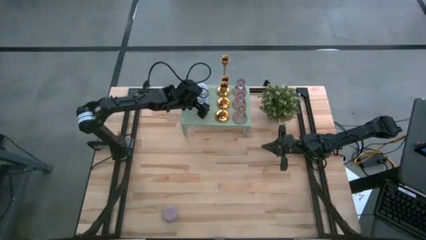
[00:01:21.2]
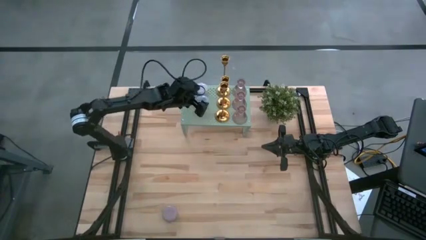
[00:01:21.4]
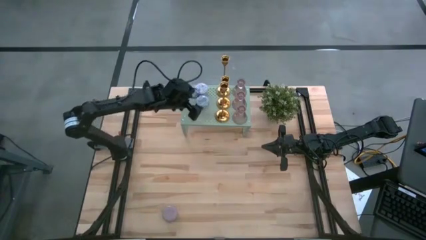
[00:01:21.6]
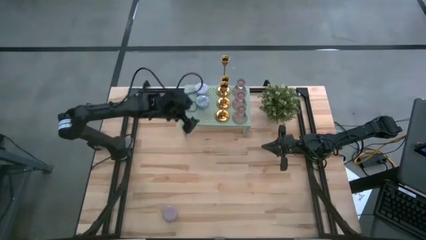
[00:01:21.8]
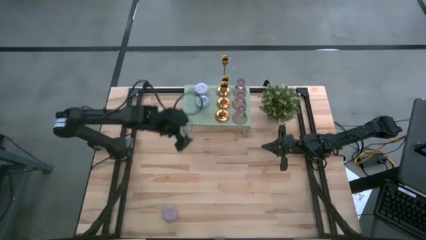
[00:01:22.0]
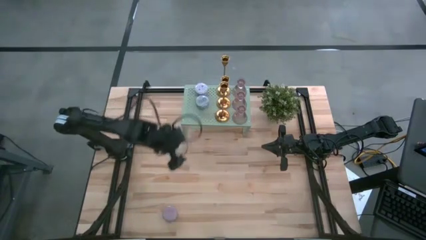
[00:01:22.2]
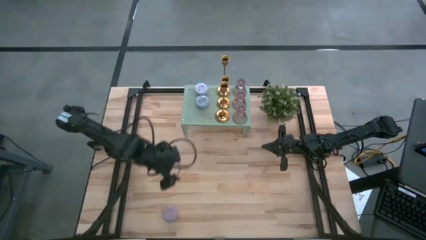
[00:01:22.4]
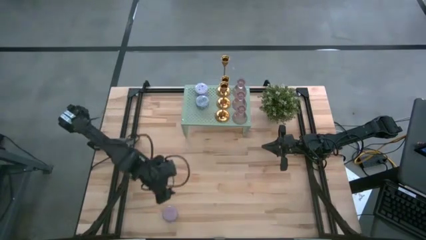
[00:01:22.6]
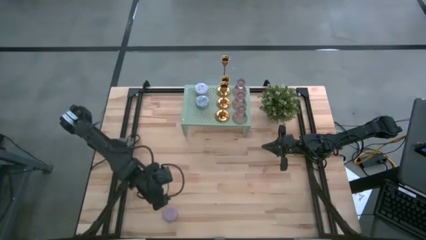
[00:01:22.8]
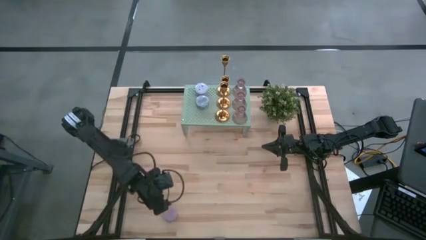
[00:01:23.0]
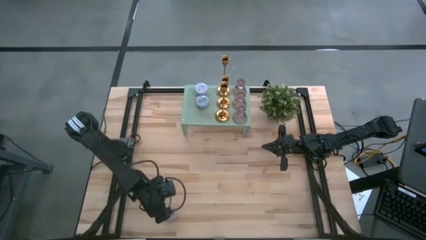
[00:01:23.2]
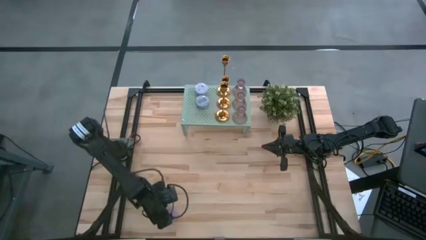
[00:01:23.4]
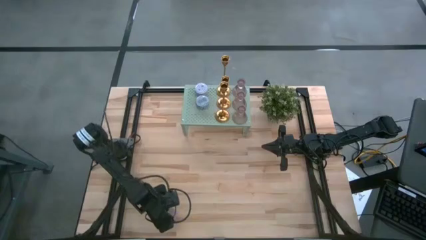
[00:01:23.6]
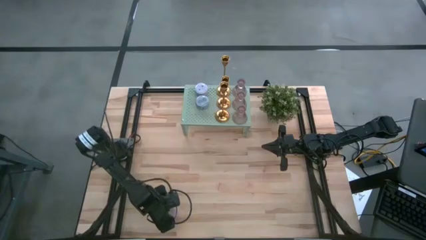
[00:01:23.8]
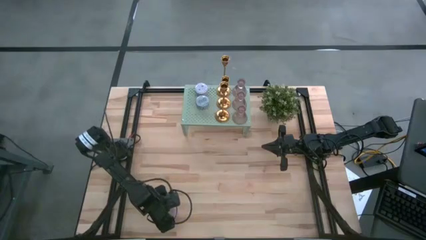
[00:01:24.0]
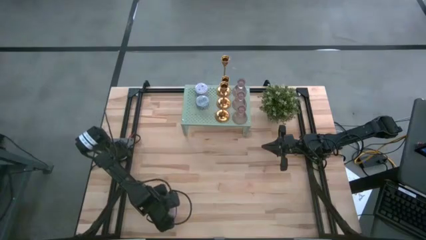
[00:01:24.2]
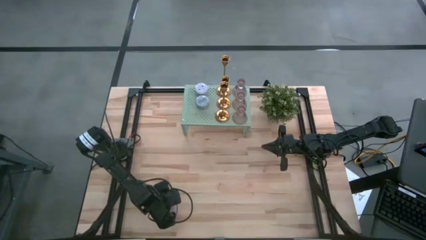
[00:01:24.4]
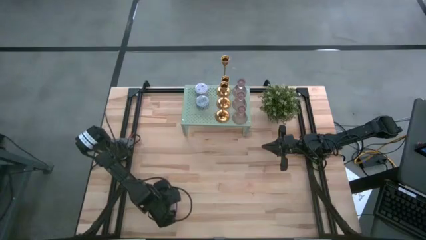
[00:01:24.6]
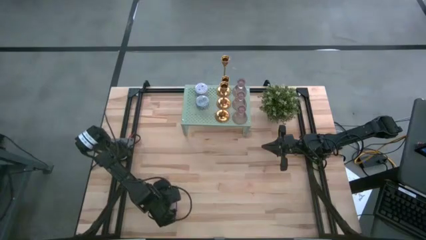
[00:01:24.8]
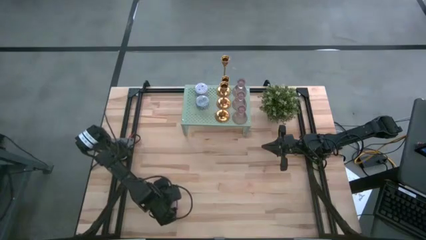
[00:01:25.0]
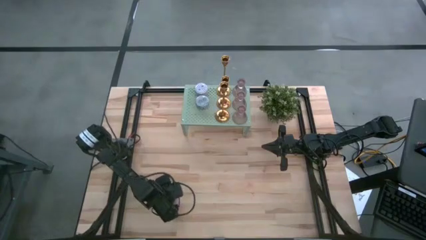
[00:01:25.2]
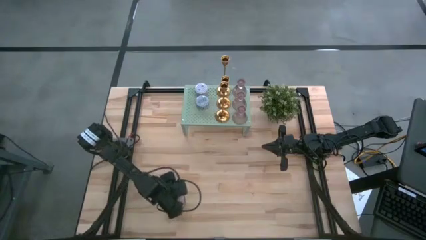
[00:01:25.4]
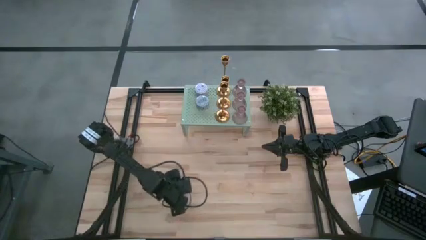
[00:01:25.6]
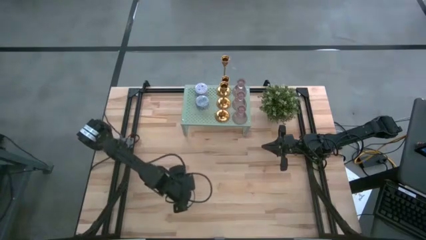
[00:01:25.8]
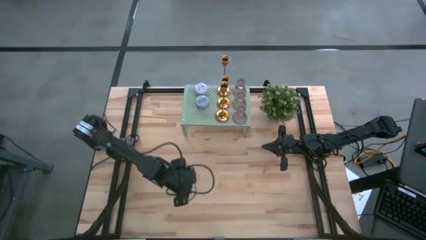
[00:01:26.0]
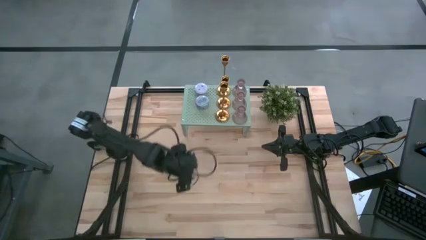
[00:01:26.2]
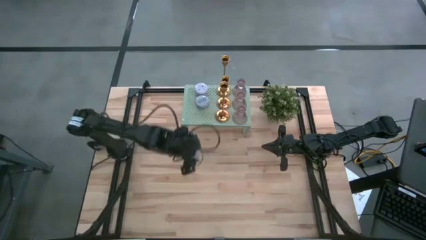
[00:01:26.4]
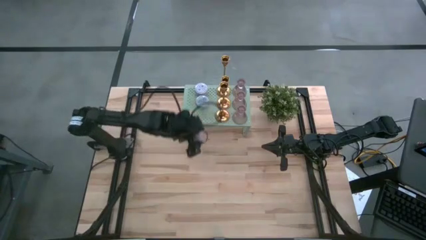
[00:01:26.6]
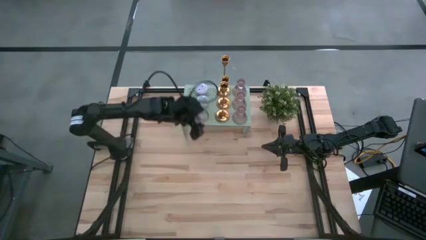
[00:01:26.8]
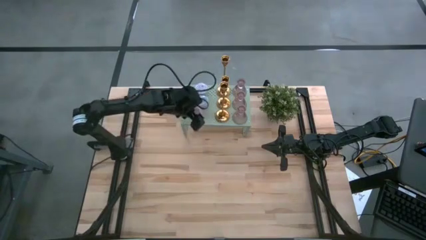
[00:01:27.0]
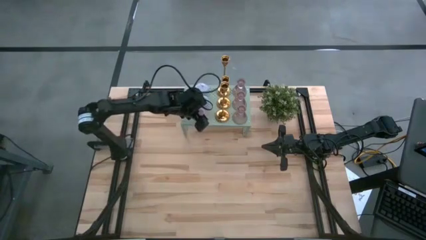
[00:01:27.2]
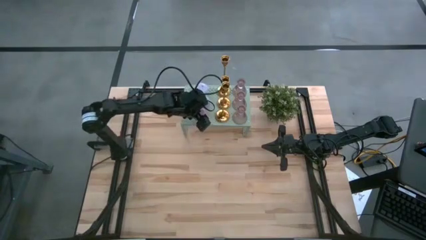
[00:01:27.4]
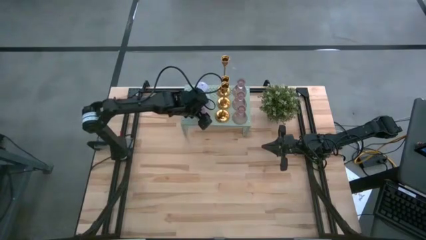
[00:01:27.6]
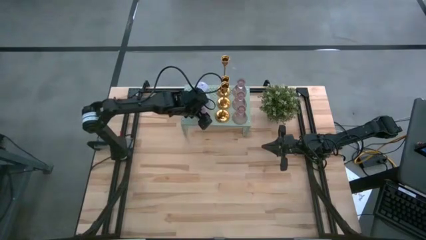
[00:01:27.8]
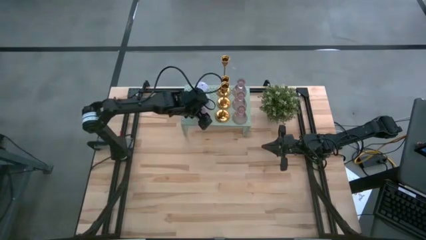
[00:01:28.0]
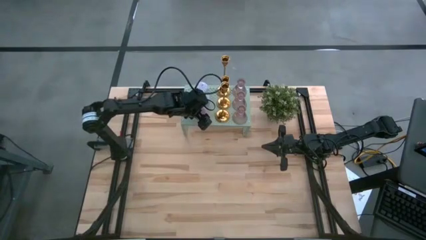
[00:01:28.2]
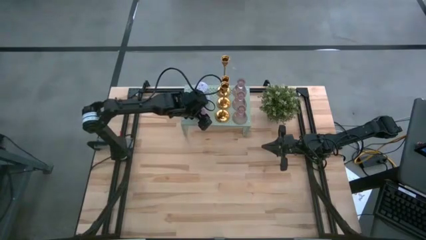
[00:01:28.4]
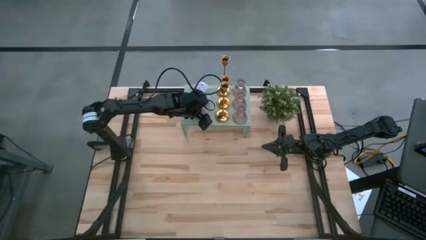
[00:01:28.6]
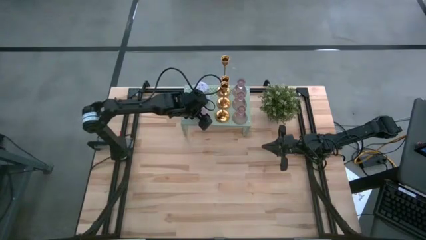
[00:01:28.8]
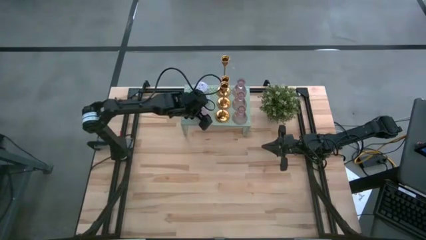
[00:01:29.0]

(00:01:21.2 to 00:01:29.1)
Task: Pick & Place candle stick holders
Put the pink scented candle on the shelf aligned with the other scented candle

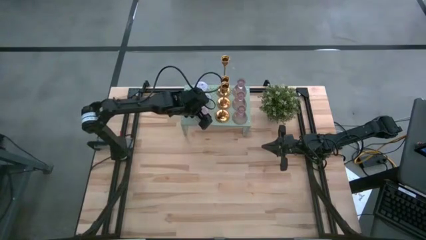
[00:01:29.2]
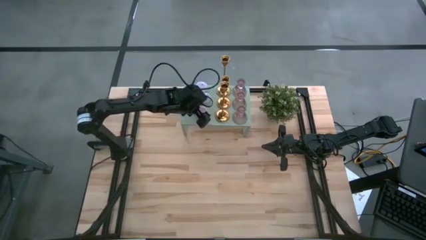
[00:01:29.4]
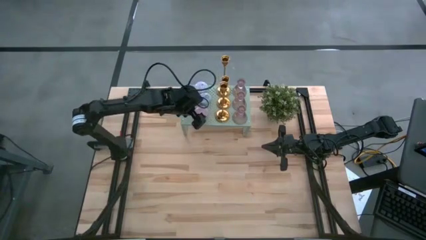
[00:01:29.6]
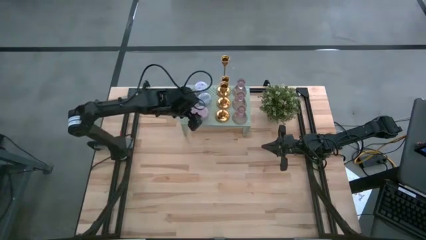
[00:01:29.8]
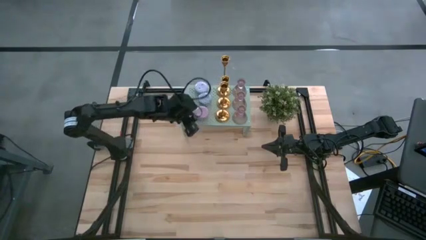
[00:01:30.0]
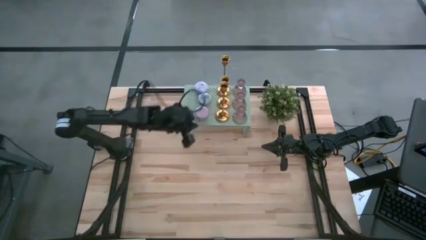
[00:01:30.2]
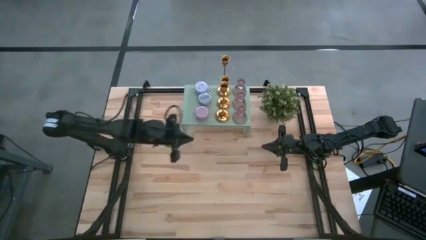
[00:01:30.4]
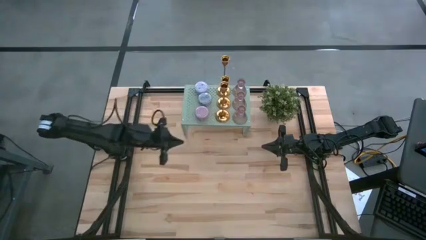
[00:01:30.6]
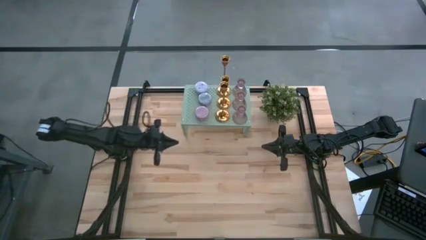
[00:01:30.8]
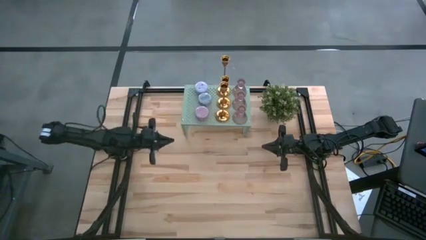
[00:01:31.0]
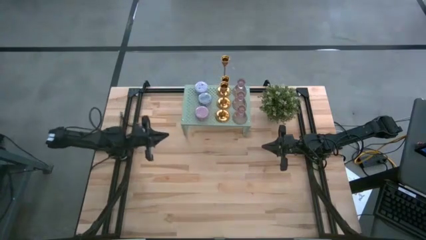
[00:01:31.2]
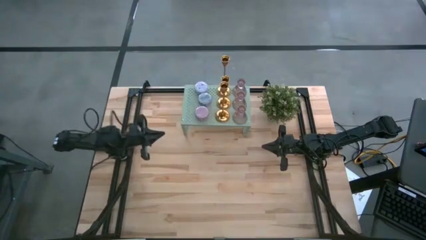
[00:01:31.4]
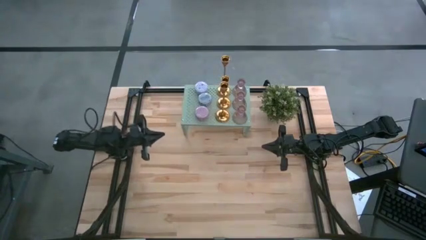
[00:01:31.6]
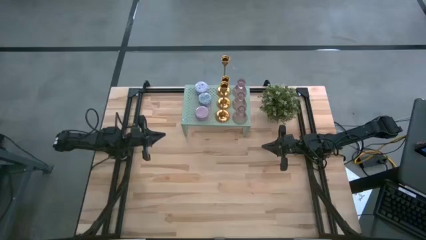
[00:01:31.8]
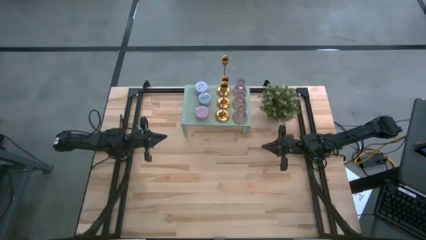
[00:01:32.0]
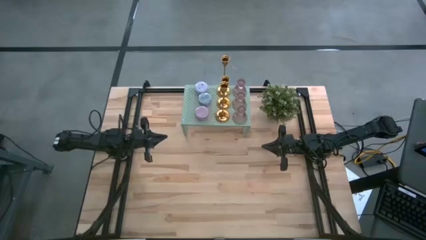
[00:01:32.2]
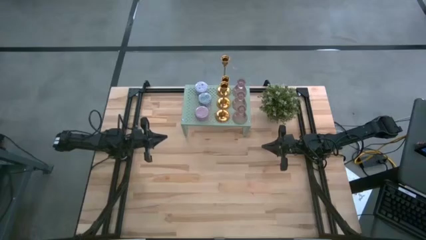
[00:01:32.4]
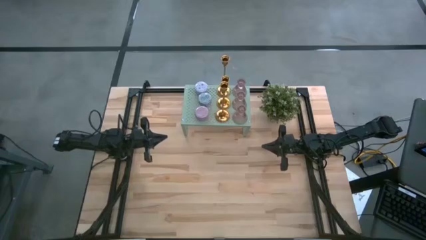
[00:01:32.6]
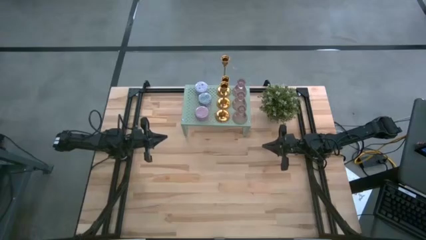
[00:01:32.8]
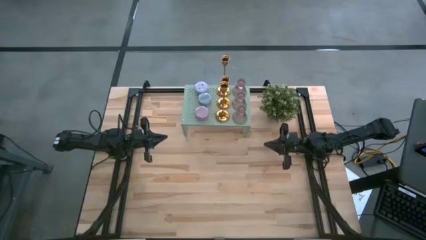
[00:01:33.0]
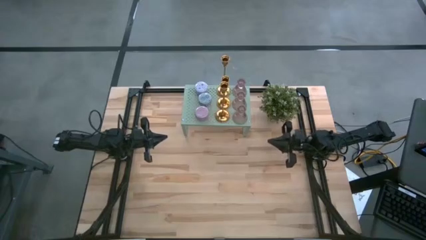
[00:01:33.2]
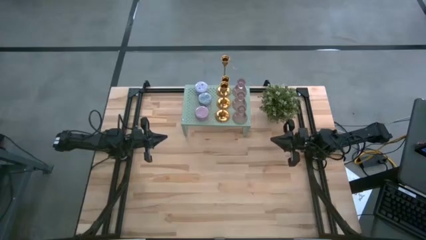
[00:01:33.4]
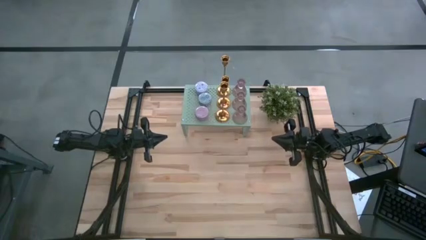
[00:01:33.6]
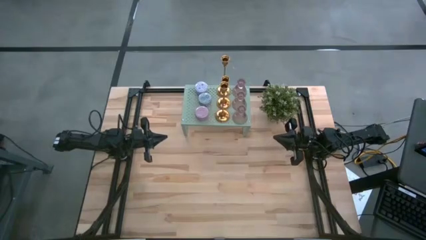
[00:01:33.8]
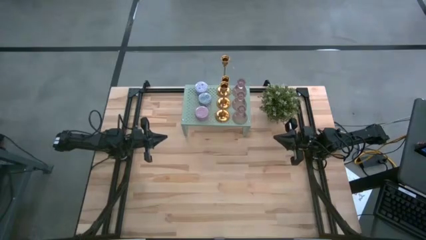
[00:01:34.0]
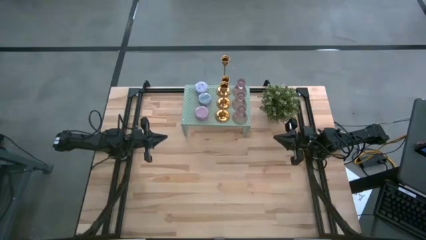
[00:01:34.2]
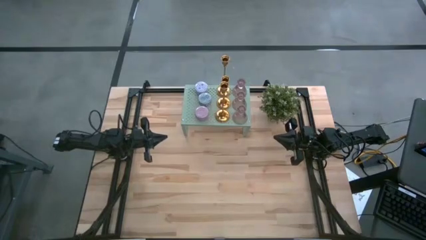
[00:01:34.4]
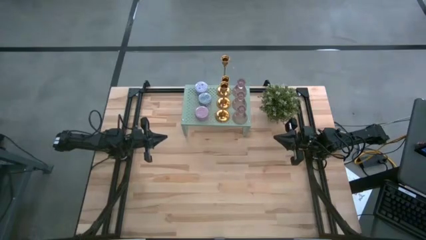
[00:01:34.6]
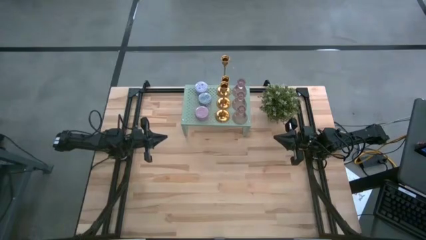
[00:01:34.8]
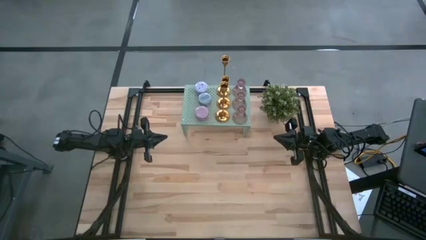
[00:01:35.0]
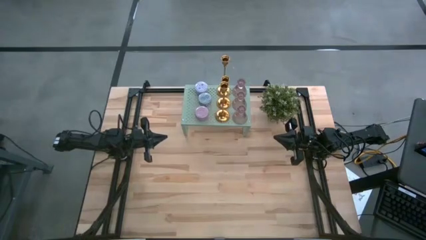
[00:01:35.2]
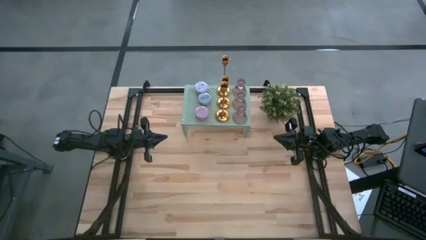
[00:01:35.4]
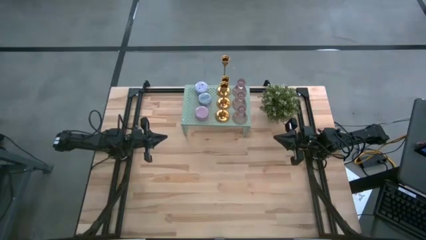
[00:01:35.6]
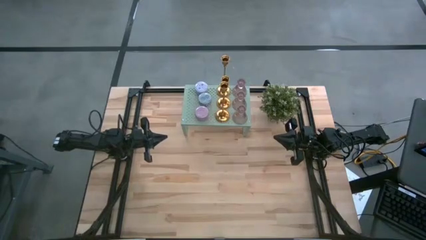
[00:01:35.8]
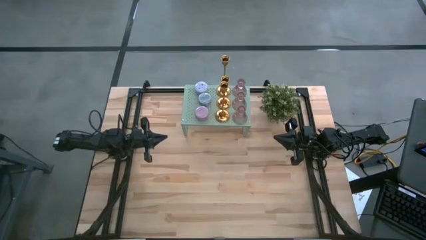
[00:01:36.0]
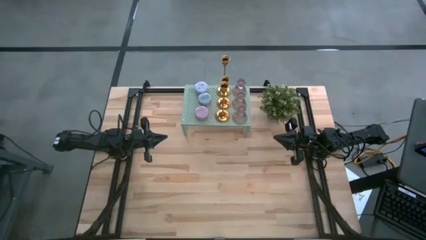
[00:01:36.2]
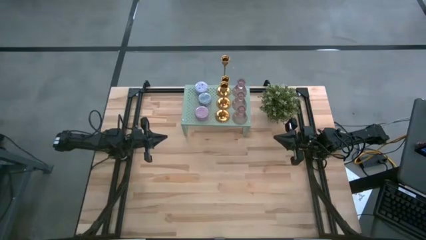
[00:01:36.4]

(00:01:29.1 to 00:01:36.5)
Return to Home Position
